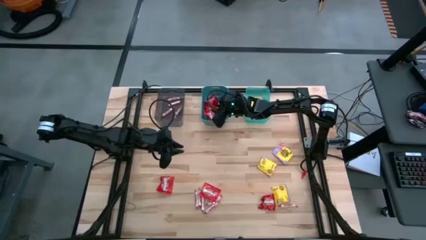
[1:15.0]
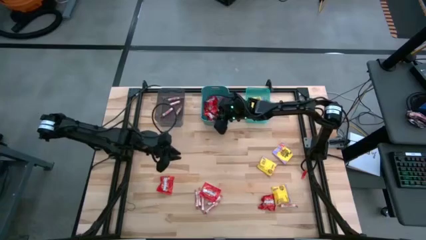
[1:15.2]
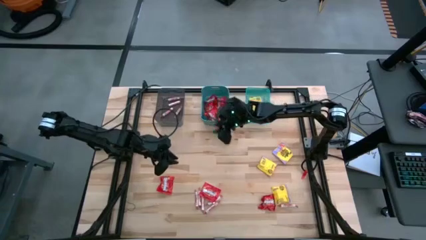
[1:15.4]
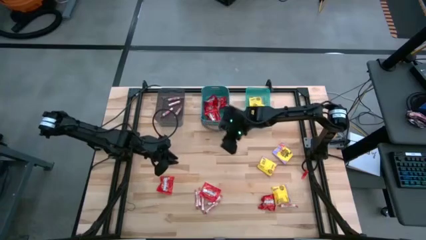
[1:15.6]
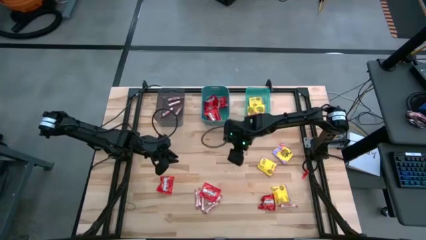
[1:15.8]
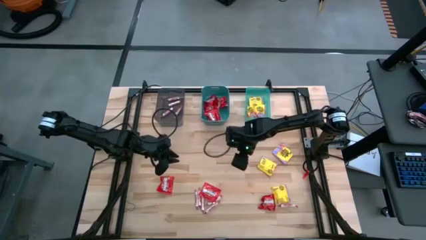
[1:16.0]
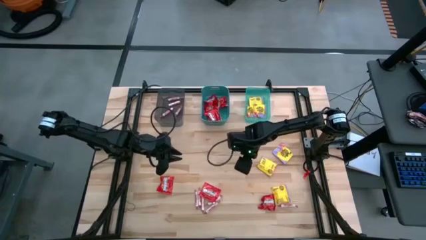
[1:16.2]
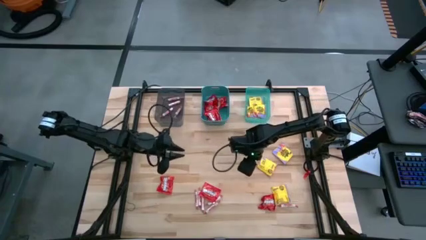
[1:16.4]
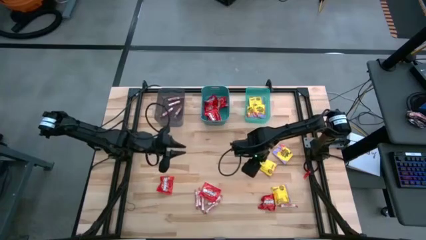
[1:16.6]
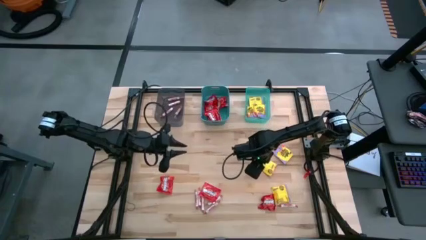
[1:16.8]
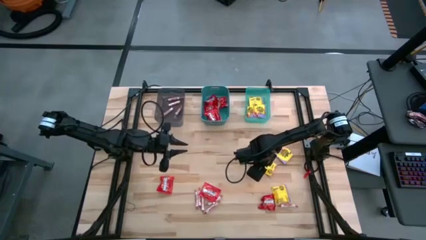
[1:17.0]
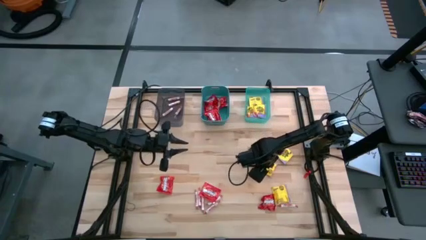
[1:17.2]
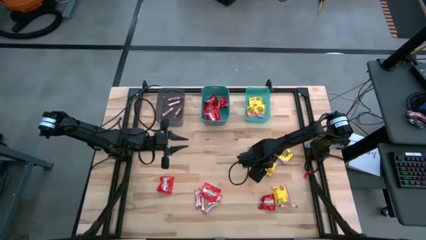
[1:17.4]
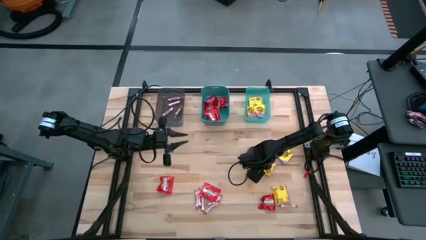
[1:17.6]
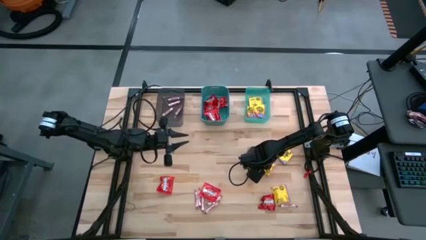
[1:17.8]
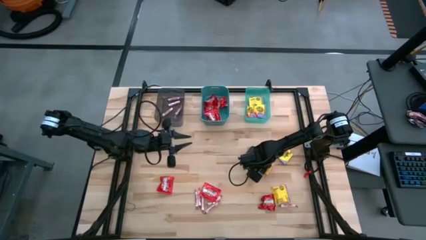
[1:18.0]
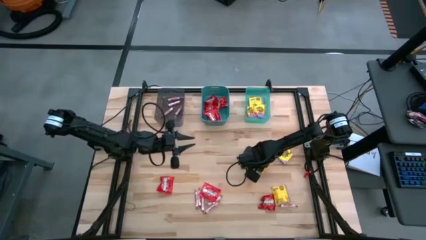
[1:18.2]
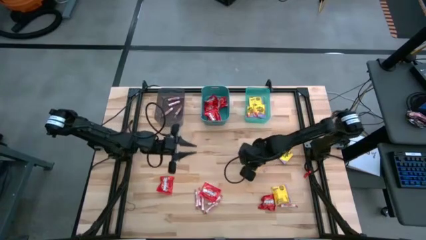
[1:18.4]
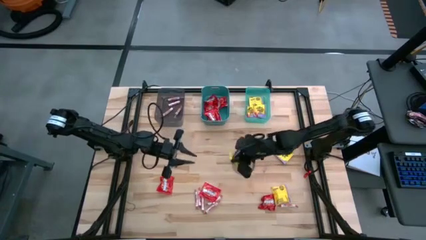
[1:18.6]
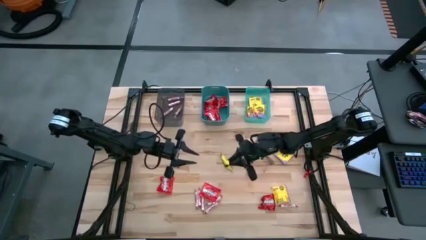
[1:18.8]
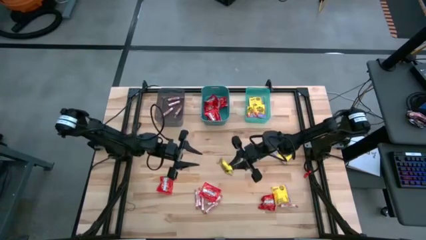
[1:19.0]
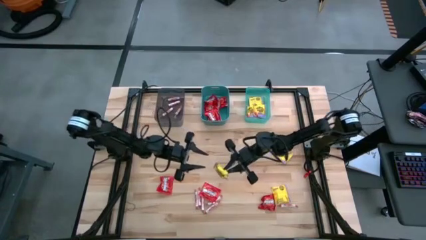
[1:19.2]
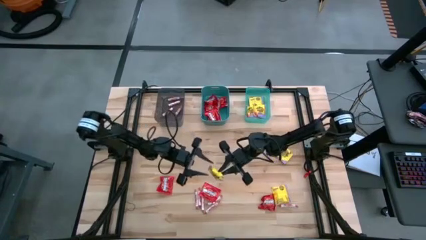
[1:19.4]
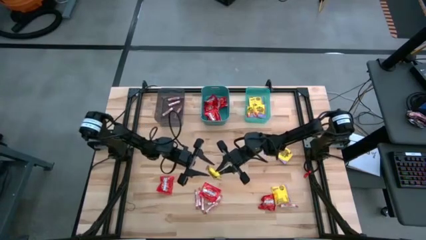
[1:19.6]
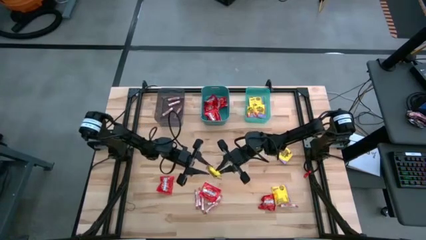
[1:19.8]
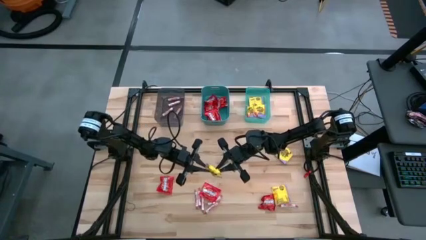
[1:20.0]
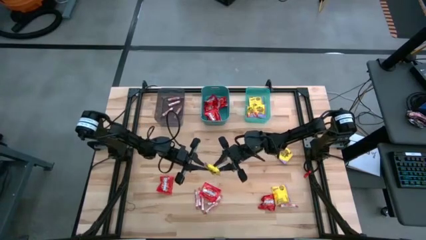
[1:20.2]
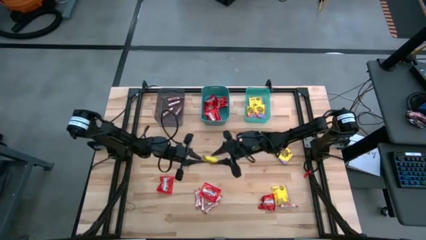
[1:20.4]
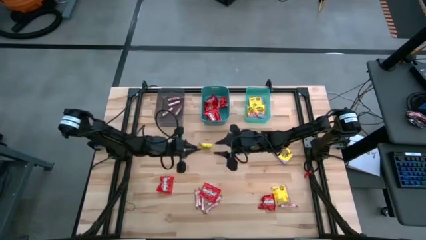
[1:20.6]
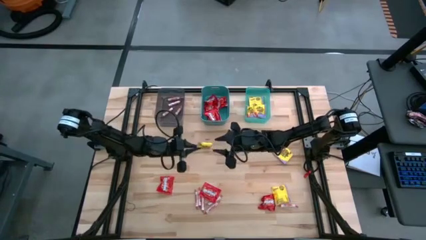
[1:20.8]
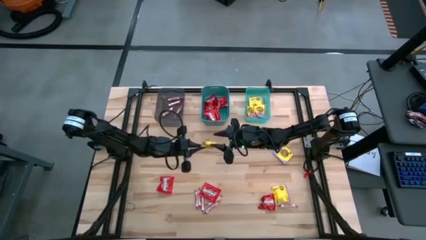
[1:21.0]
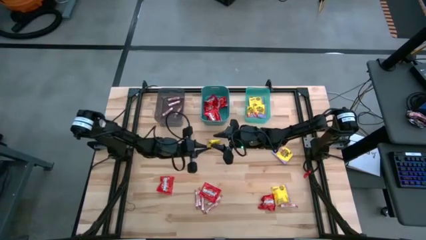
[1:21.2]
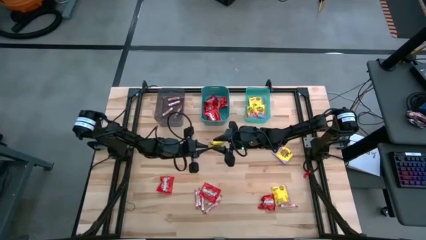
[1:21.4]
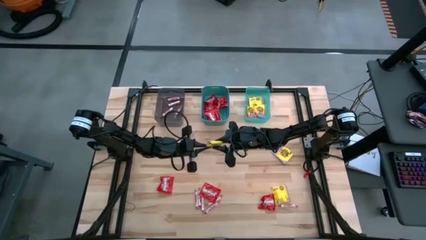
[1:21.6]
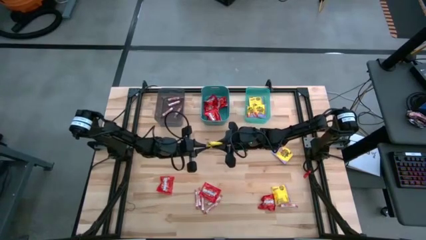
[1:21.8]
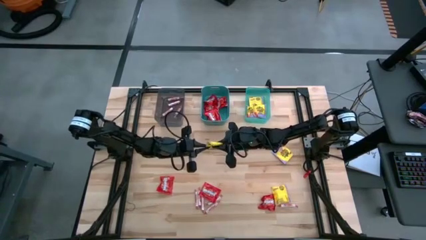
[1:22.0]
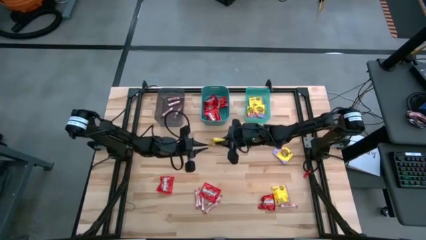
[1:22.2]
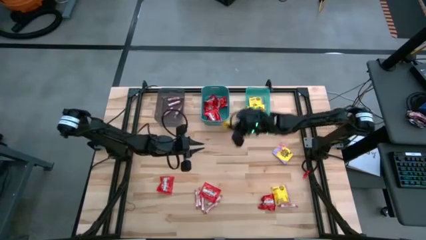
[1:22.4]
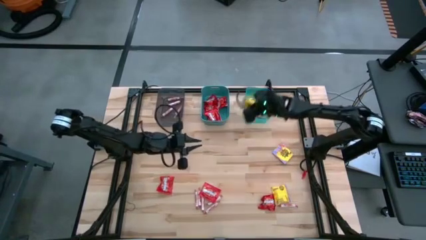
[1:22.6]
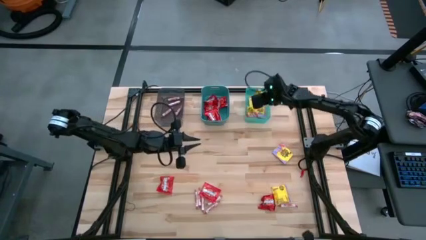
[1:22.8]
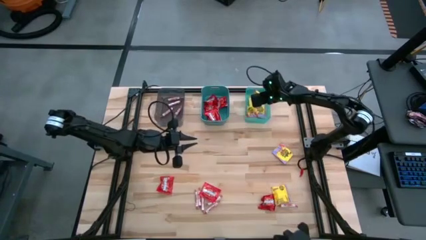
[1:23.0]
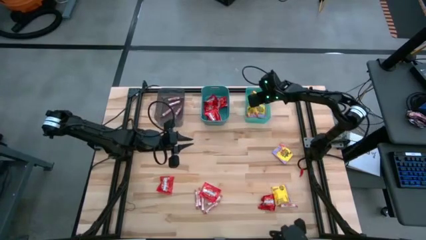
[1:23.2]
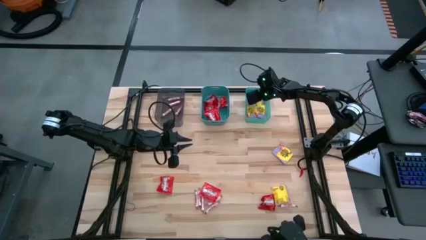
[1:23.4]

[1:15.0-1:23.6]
Task: Sort candy
Put the yellow candy on the light green bin

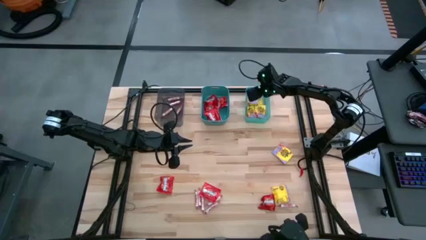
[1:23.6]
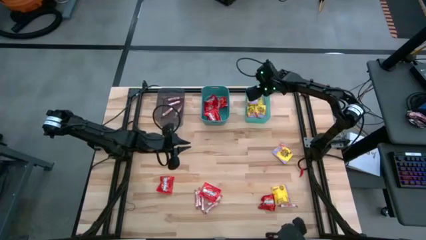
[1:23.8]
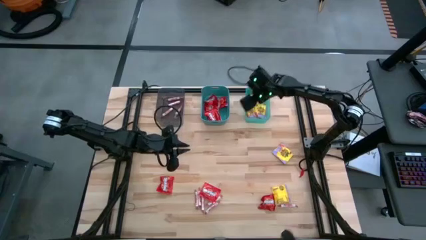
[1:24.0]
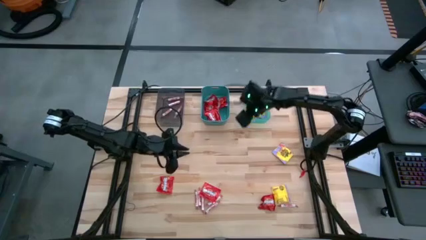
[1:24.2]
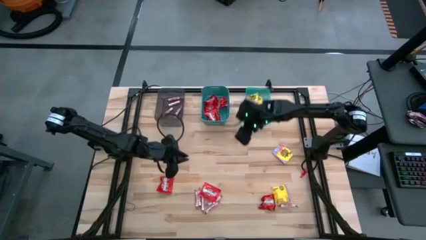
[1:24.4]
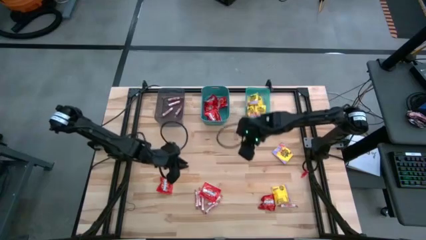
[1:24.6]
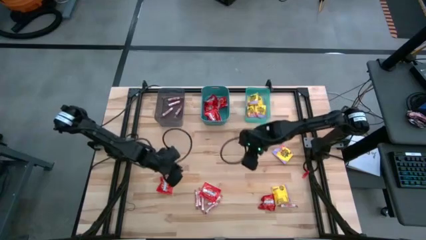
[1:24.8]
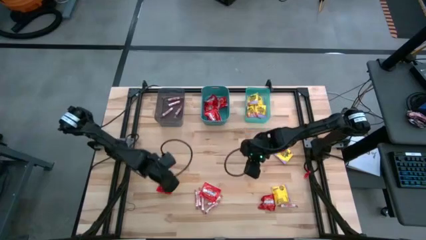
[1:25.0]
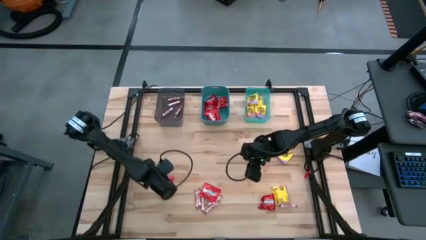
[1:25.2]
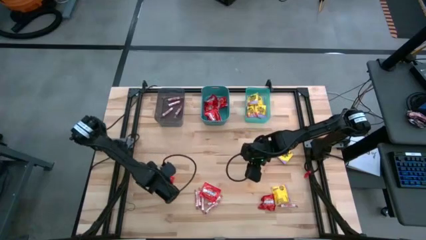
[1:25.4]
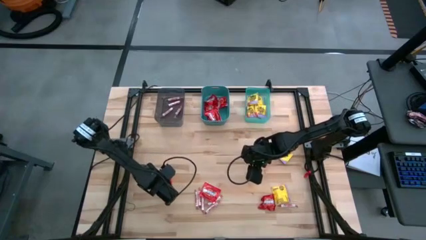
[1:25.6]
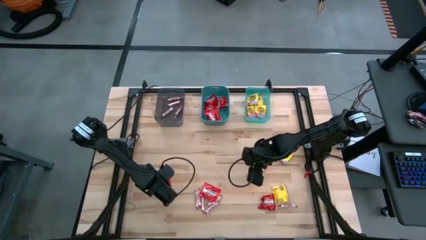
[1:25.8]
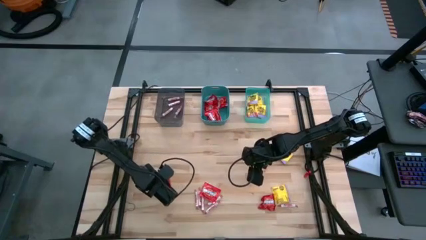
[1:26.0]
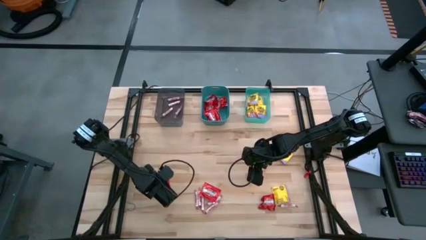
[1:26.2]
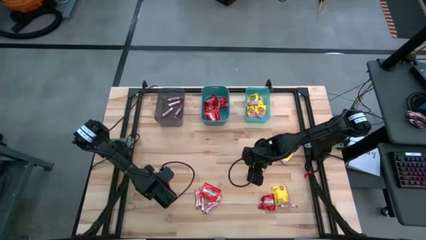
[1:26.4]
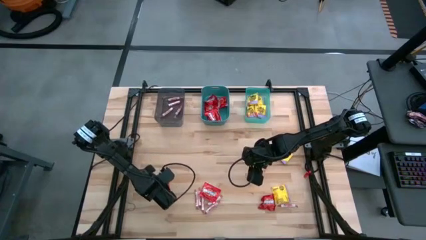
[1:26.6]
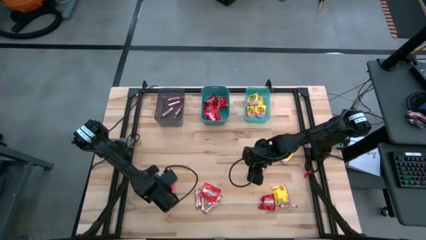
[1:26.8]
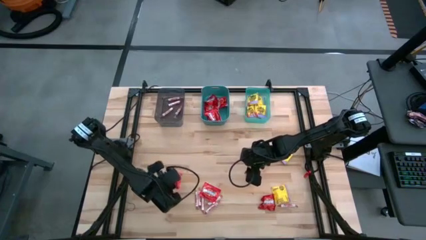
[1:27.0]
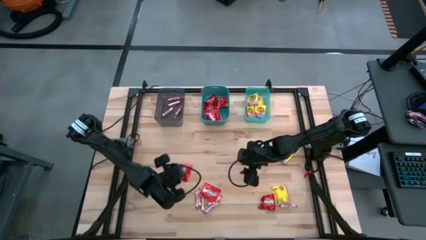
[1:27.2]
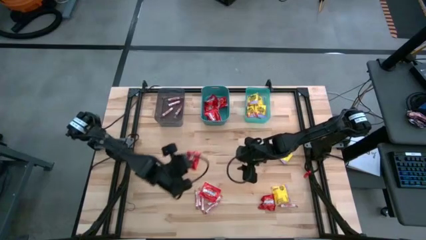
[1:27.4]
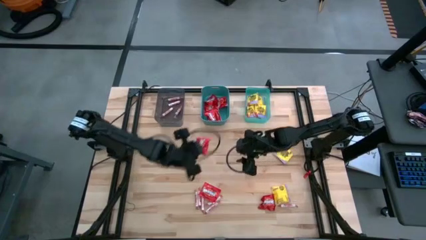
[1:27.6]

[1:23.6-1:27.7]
Put the middle left red candy on the dark green bin

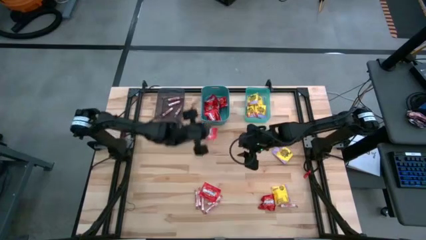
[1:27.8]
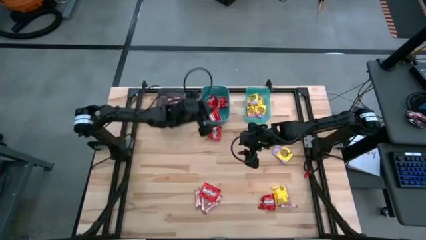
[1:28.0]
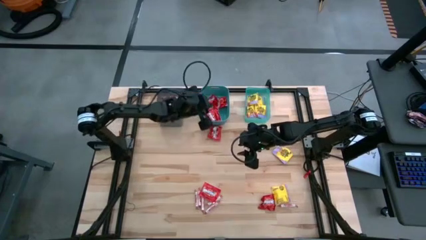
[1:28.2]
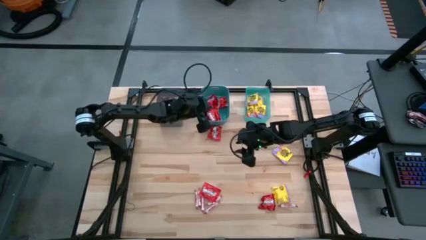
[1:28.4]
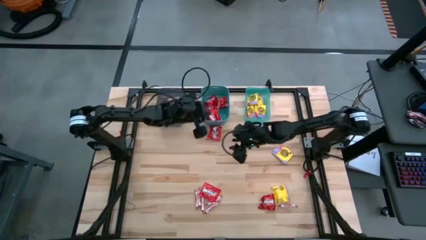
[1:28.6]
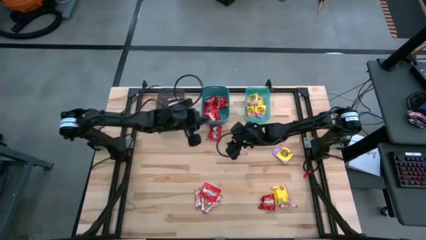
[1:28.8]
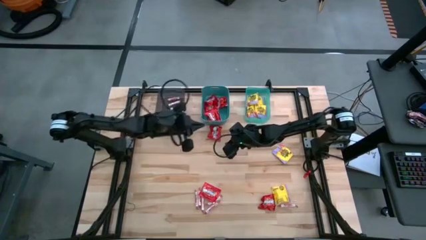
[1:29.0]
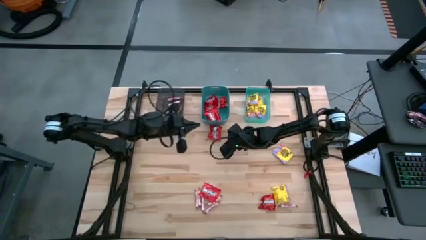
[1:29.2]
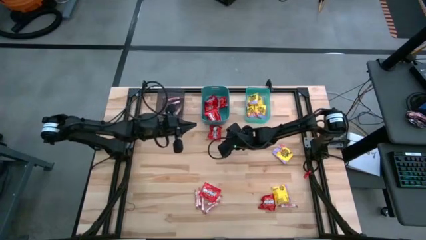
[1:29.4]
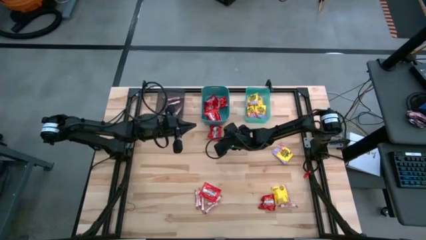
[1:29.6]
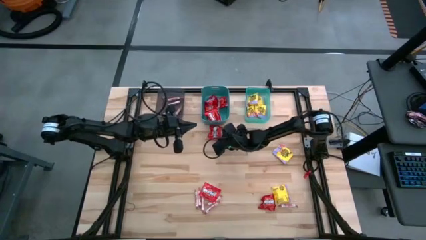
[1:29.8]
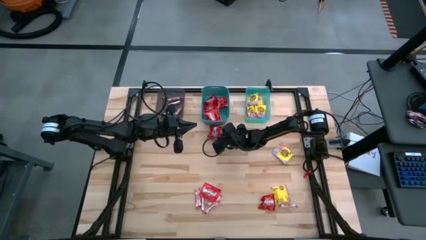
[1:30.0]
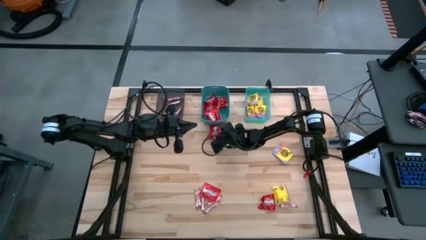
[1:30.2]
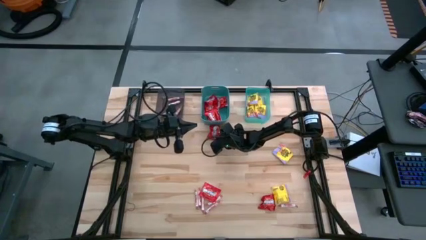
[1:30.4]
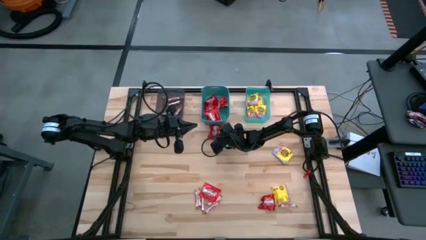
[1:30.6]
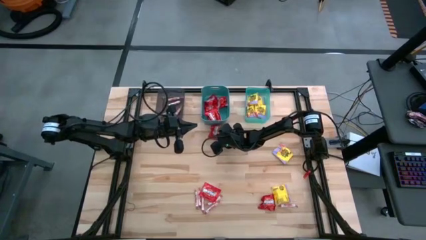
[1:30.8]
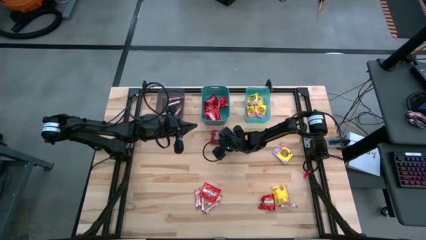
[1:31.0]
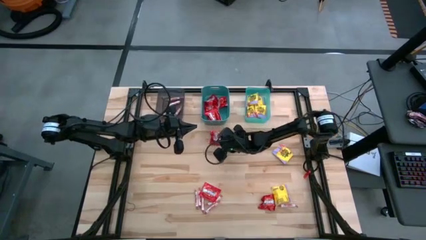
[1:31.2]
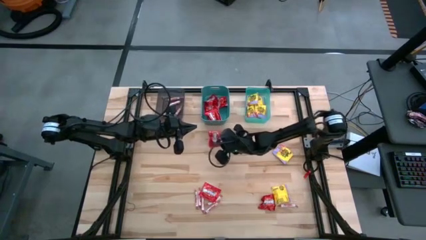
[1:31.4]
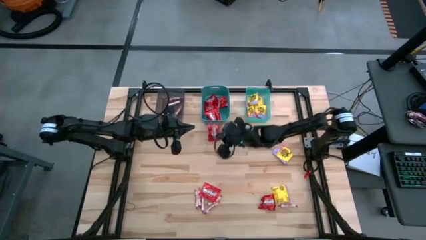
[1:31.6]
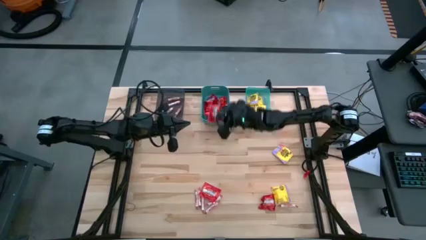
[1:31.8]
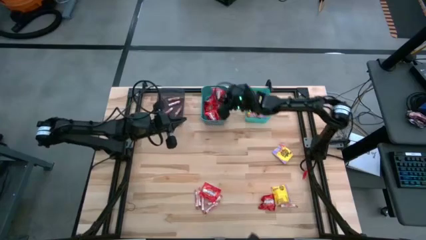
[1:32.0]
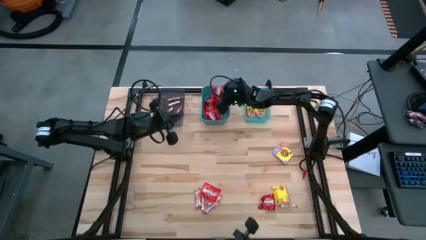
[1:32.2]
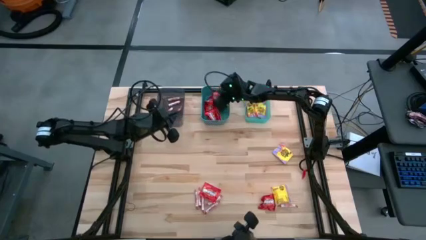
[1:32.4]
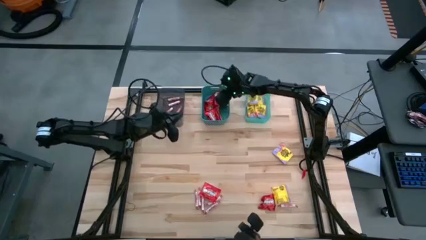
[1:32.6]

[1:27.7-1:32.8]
Put the middle left red candy on the dark green bin
